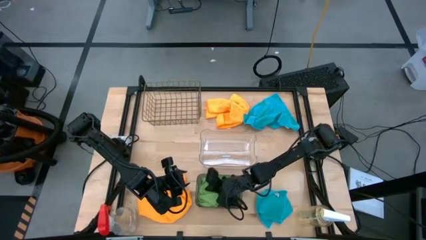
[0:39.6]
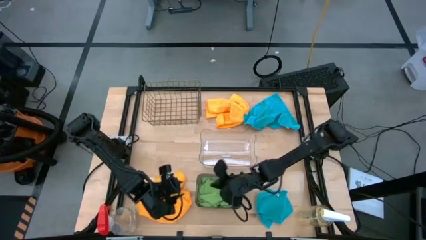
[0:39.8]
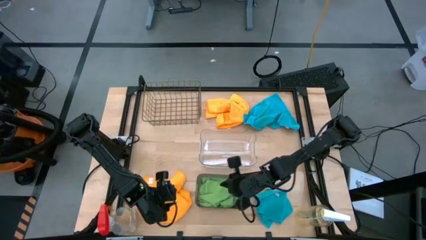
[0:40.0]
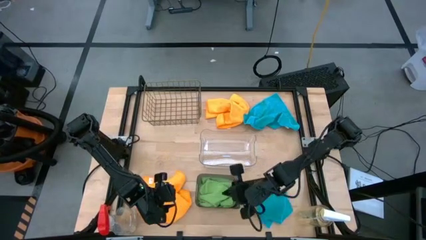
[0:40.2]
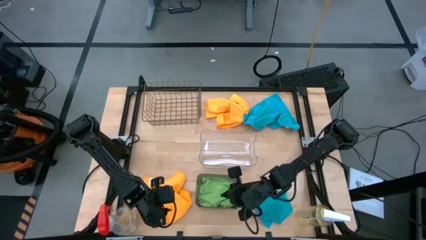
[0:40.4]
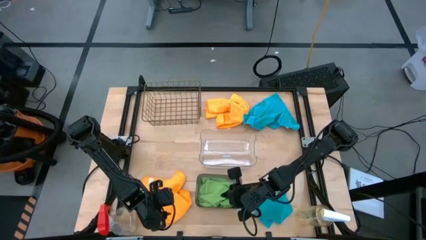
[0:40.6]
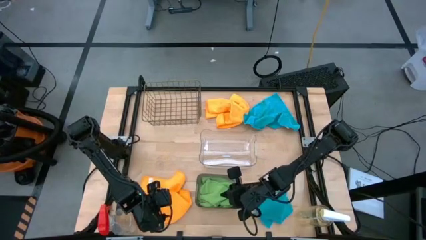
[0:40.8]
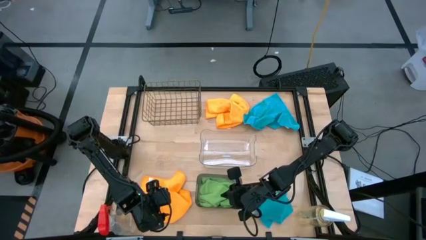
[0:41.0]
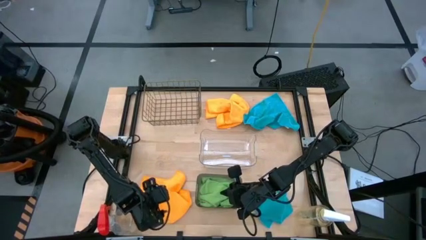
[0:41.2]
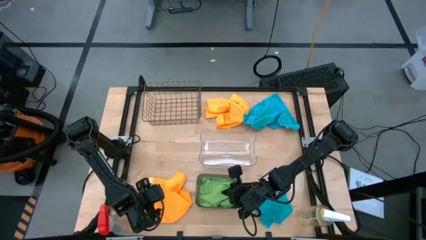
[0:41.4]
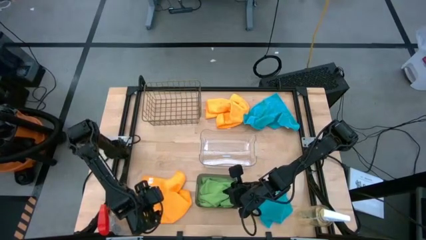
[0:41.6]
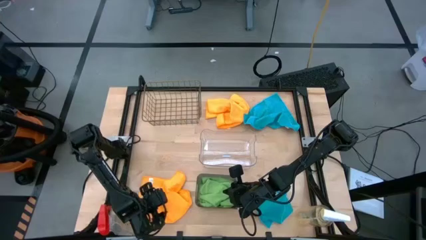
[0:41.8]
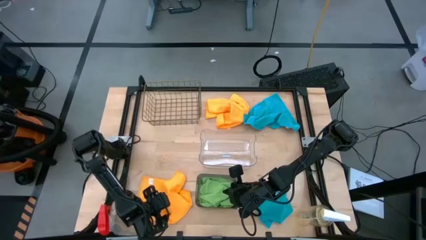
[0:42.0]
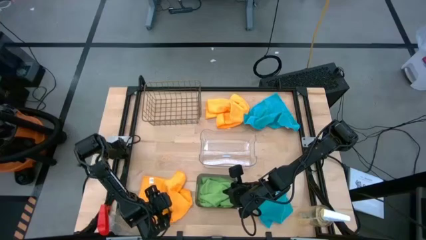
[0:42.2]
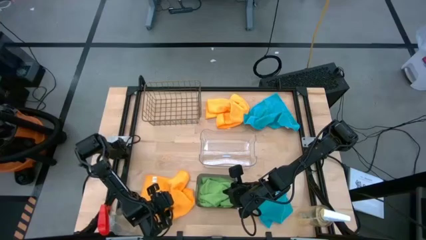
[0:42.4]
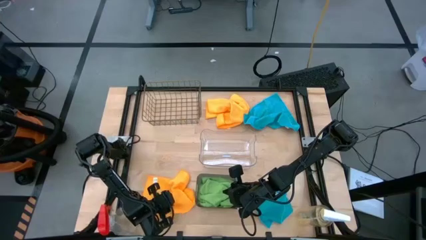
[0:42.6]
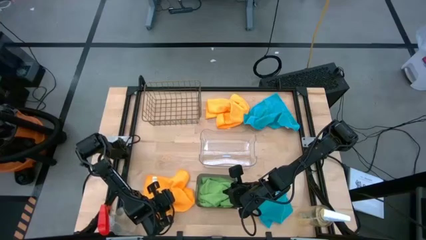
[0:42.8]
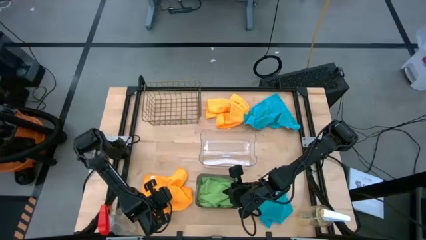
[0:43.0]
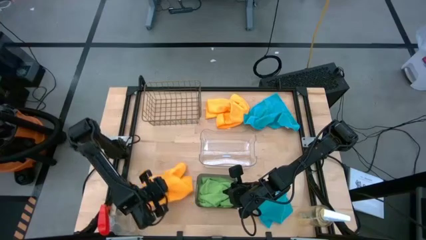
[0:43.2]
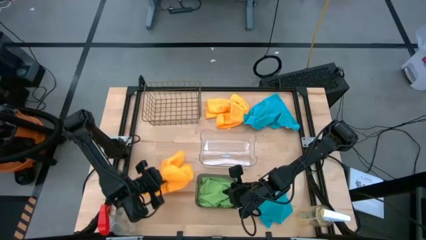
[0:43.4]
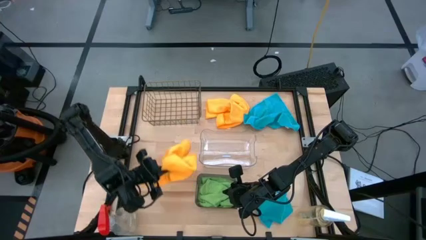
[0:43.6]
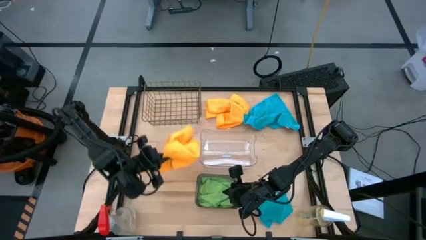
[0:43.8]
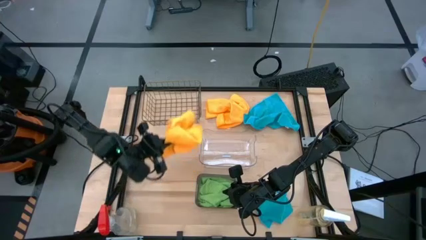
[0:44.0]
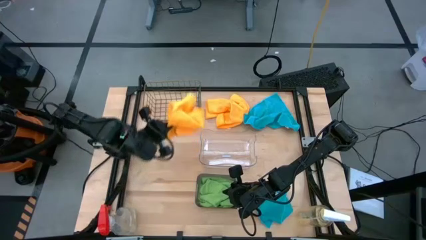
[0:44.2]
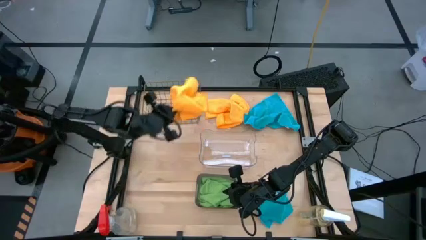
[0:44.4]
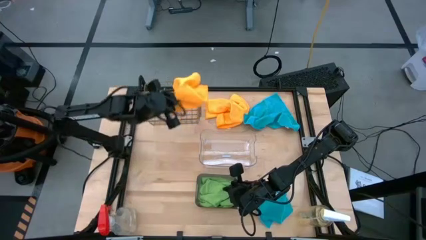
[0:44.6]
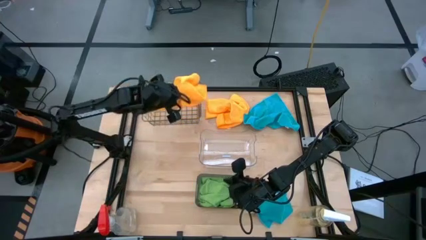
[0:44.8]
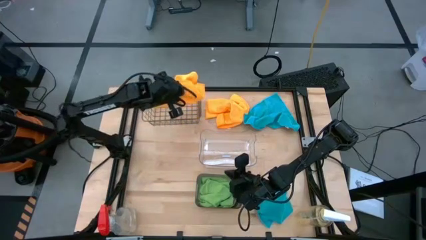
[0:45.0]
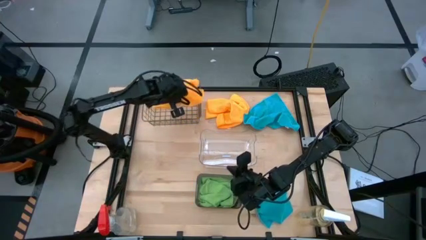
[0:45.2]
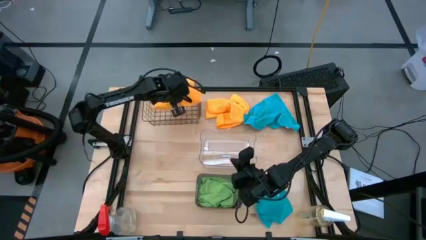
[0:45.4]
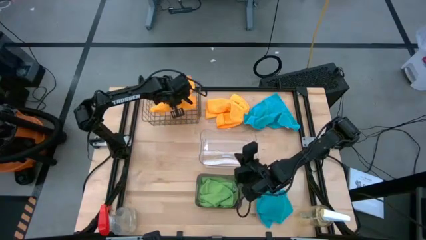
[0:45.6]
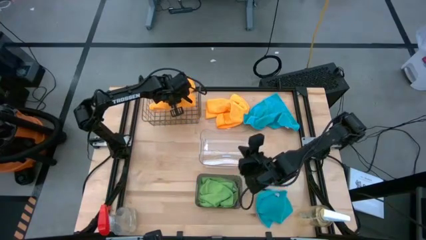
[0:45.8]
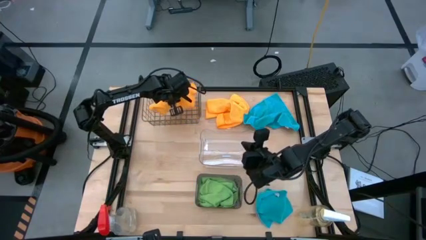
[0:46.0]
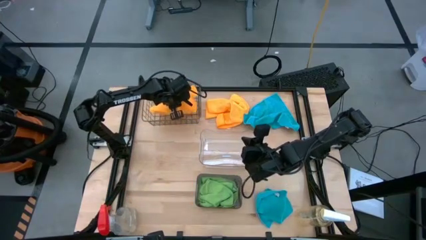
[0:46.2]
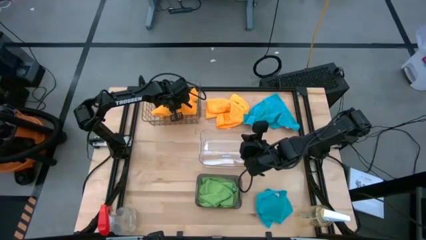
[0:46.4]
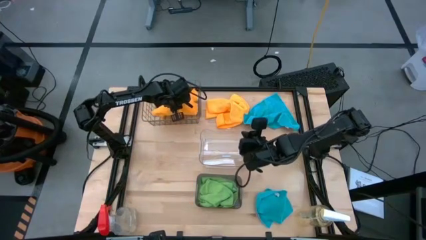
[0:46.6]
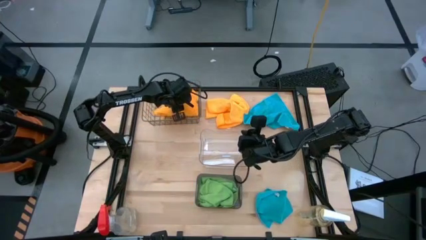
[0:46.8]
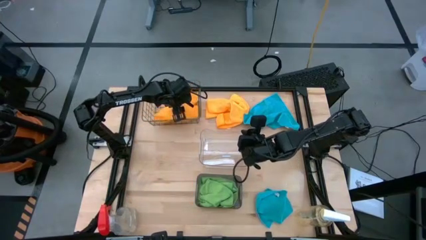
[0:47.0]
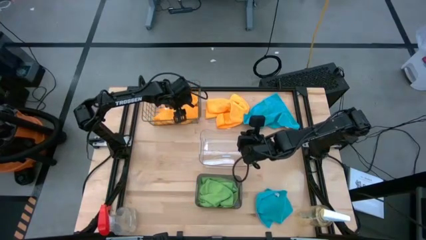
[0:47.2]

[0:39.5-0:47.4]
Task: Sort microfiber towel by color & place in baskets
Put the bottom yellow towel into the black wire basket

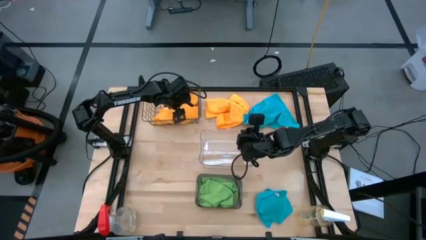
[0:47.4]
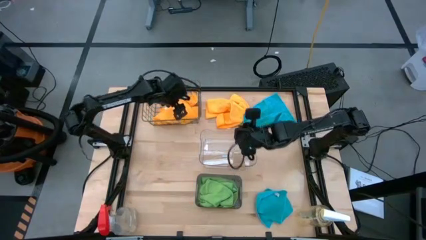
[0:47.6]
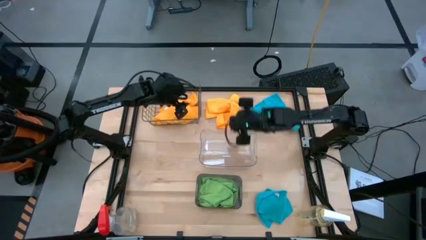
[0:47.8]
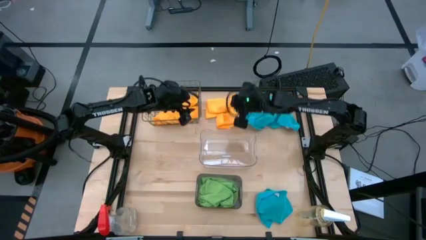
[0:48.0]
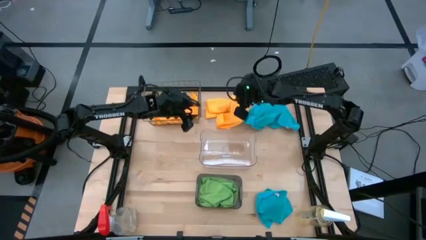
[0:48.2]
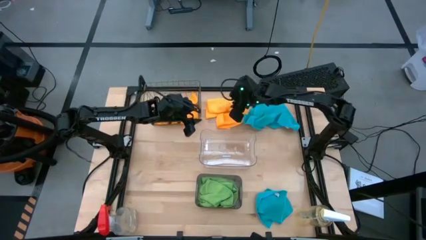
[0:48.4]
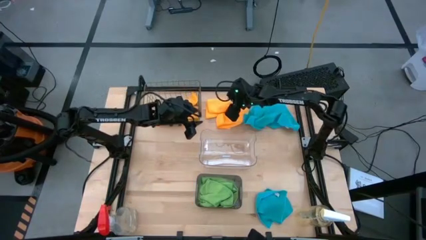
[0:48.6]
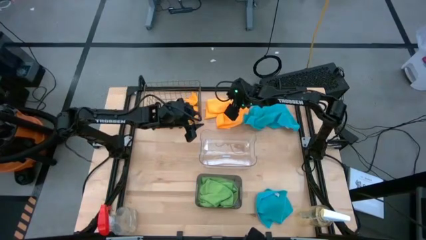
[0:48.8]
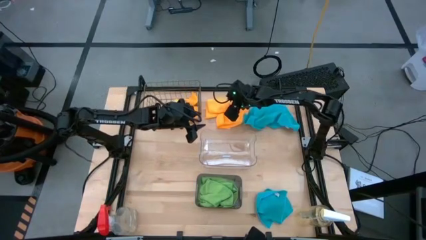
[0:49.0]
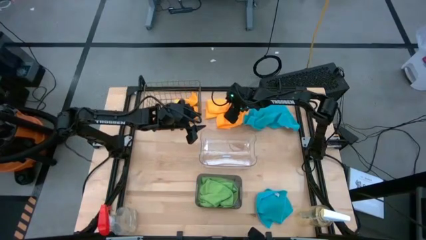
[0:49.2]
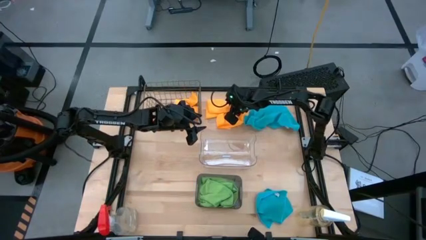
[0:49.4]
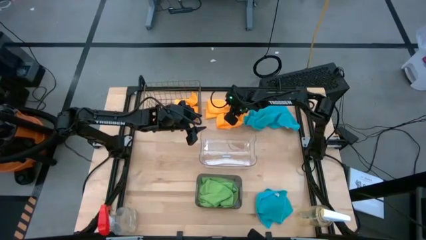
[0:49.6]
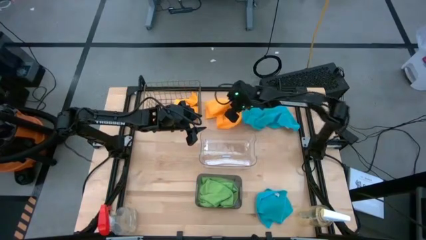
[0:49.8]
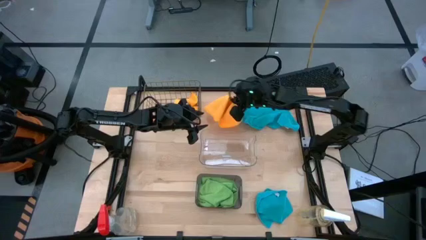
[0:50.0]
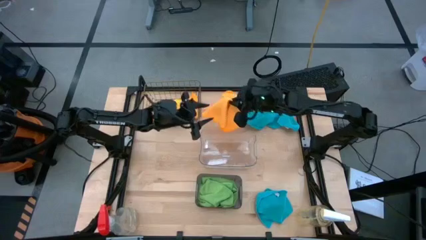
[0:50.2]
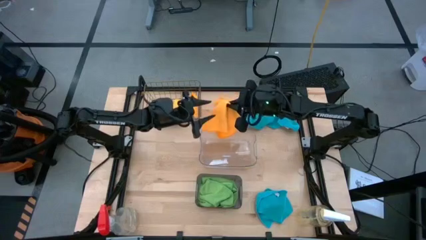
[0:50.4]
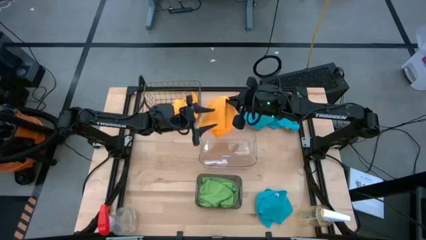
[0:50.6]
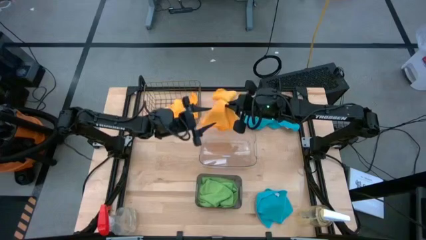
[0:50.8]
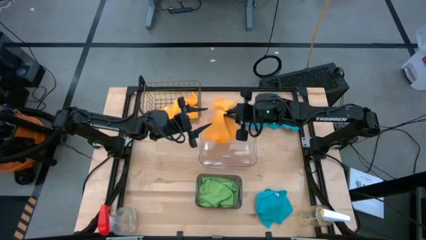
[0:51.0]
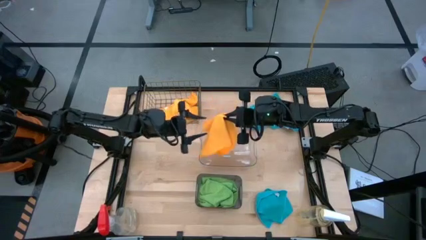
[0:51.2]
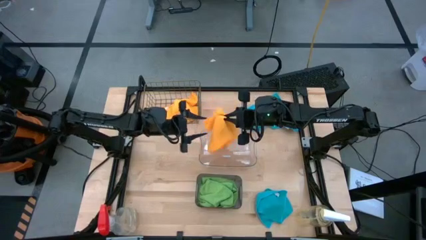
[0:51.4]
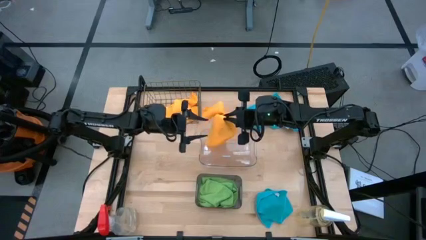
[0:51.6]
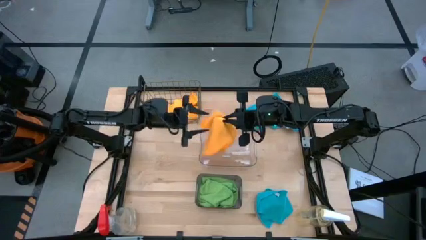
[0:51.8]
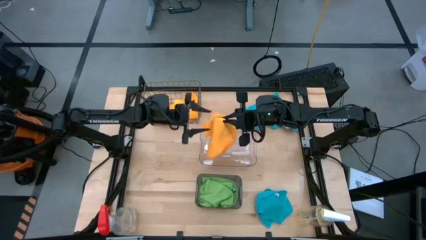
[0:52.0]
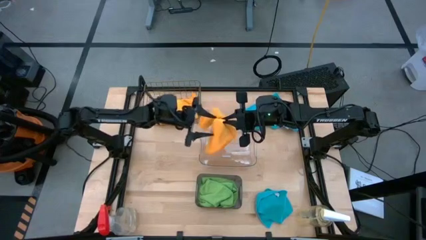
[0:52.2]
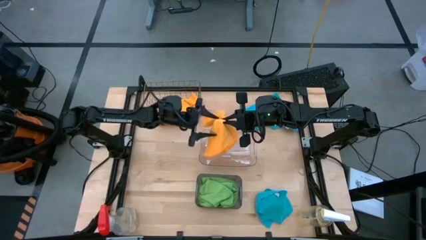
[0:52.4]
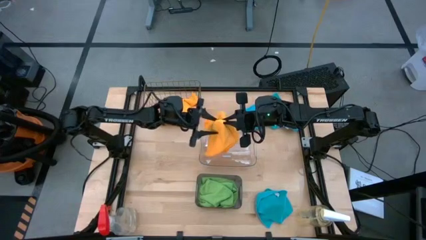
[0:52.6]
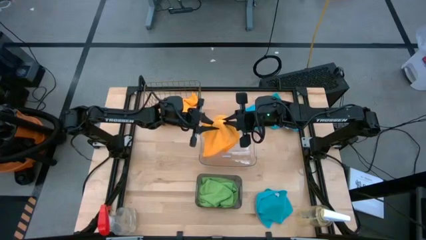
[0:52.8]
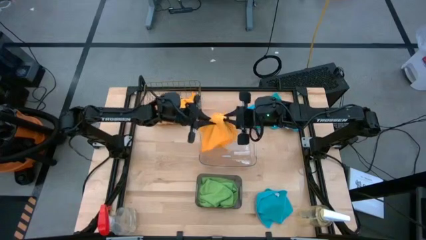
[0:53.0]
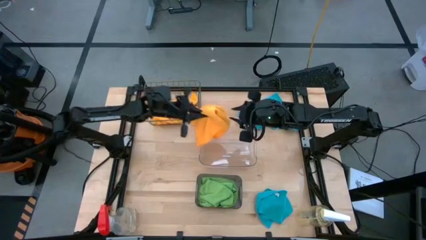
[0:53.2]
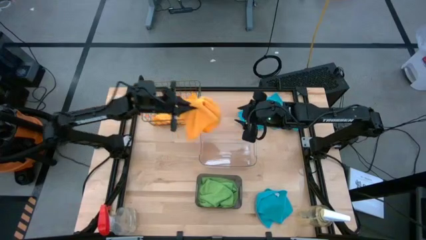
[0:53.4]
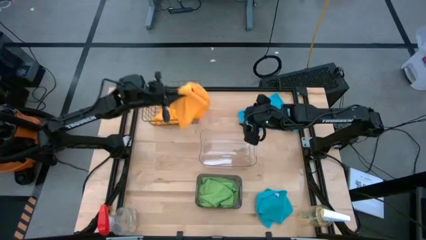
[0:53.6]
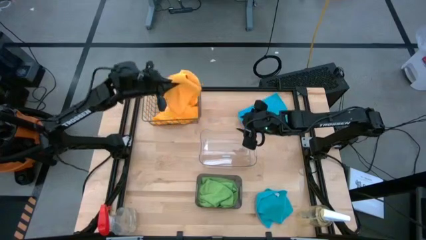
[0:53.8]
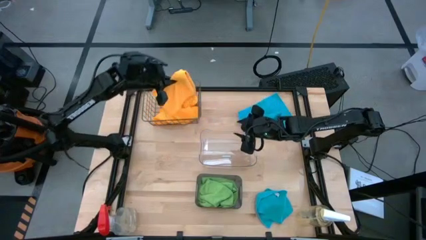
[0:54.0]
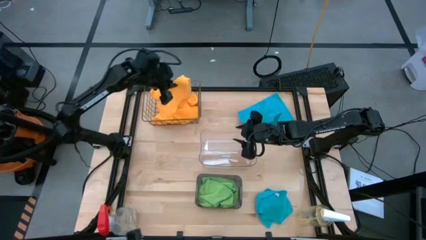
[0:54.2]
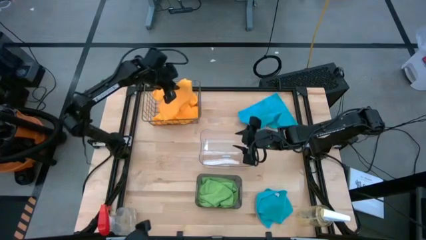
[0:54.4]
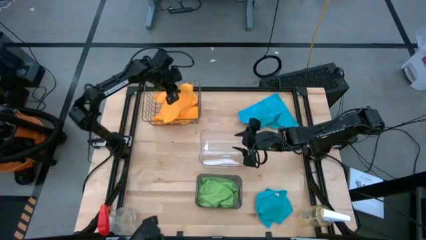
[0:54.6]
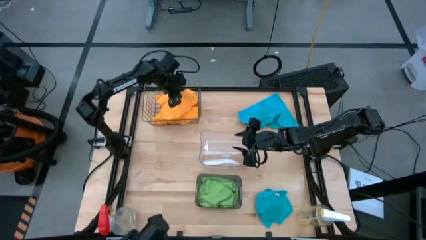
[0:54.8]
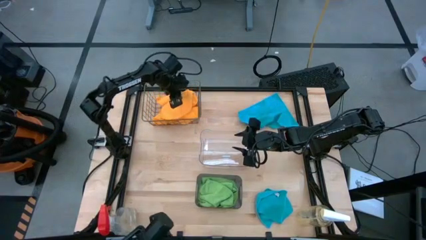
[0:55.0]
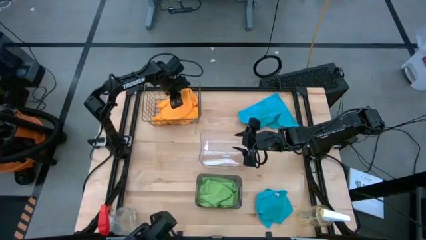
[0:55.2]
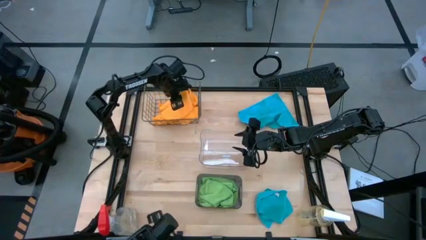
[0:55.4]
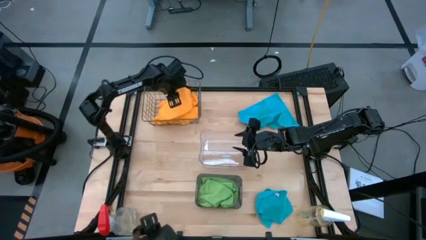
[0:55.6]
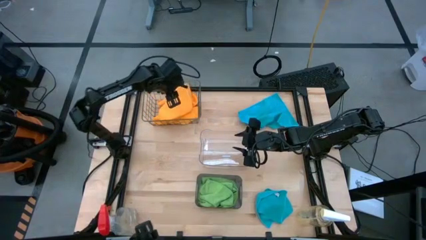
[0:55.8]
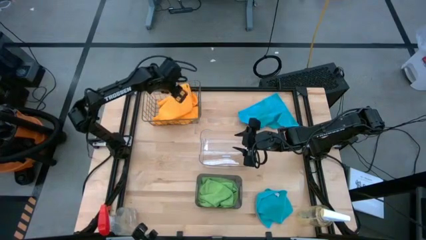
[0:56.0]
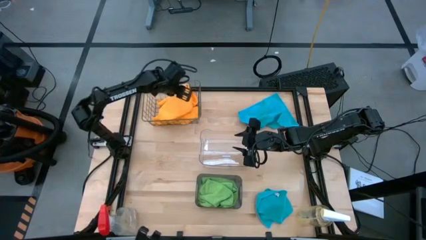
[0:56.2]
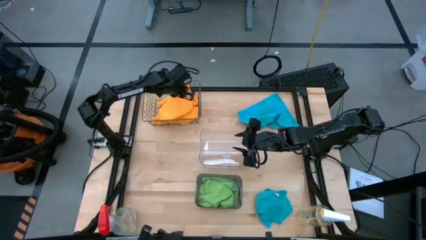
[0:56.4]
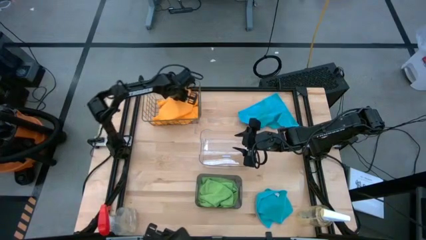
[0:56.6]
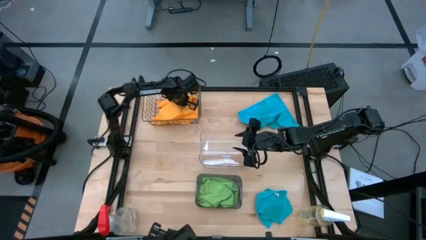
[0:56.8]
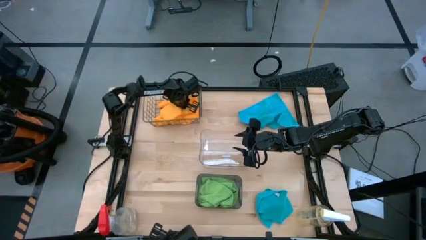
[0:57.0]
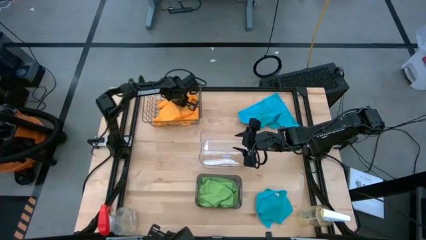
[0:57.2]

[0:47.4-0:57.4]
Put the yellow towel into the black wire basket
